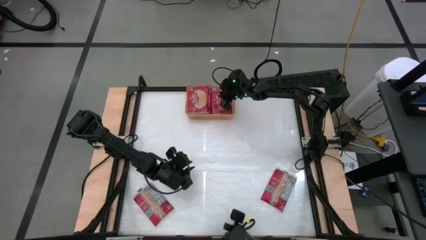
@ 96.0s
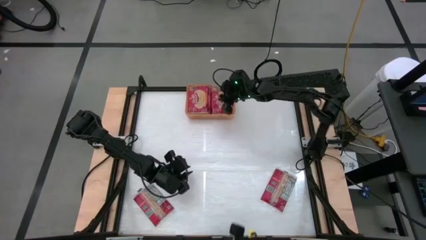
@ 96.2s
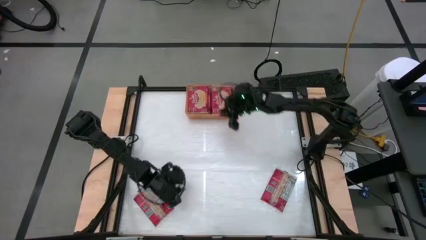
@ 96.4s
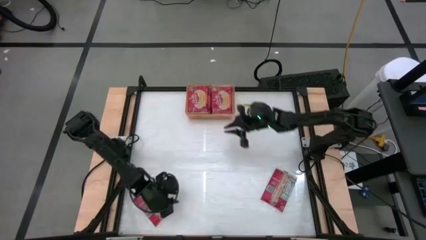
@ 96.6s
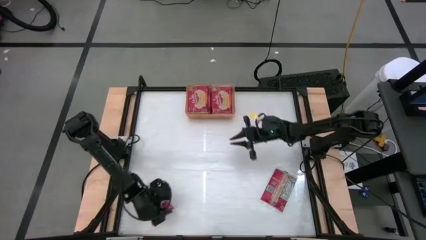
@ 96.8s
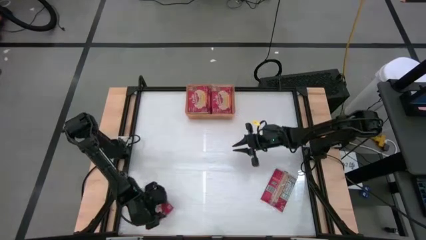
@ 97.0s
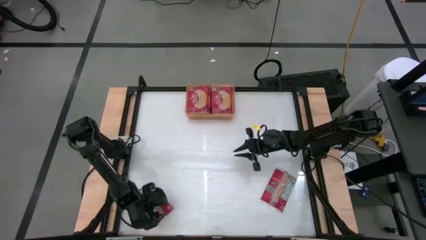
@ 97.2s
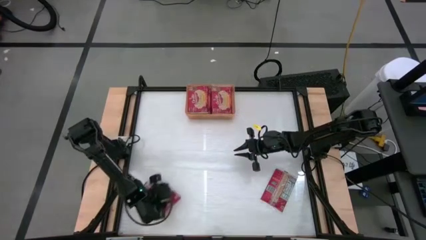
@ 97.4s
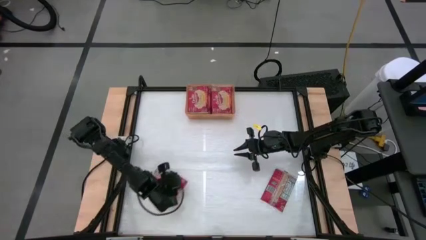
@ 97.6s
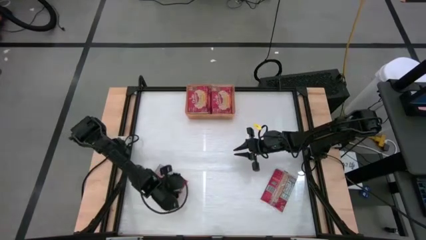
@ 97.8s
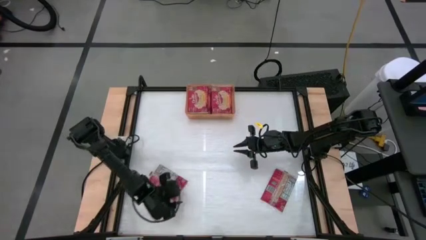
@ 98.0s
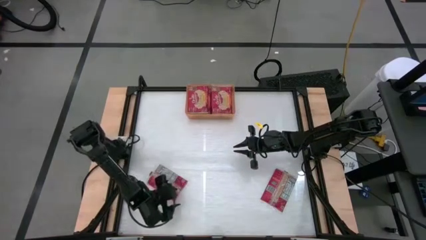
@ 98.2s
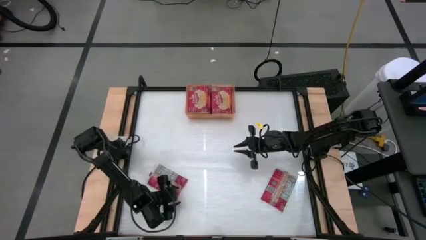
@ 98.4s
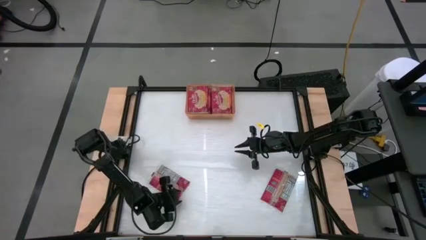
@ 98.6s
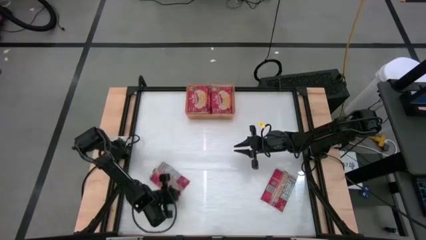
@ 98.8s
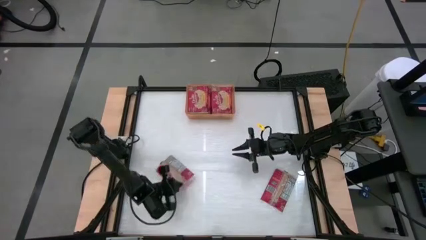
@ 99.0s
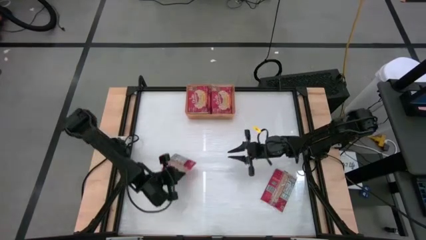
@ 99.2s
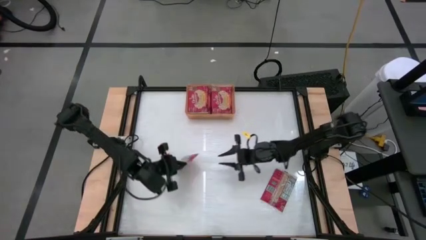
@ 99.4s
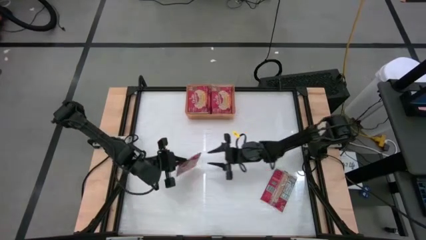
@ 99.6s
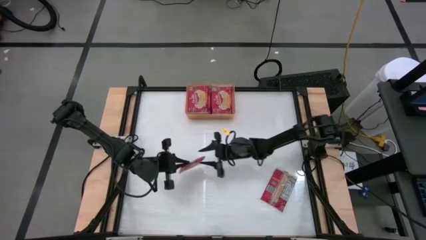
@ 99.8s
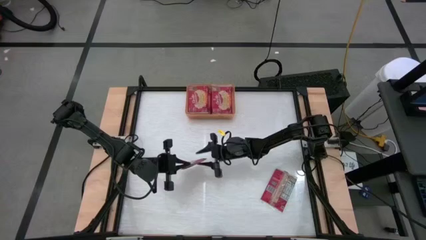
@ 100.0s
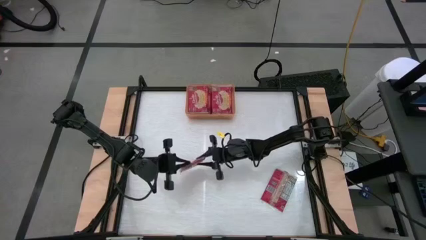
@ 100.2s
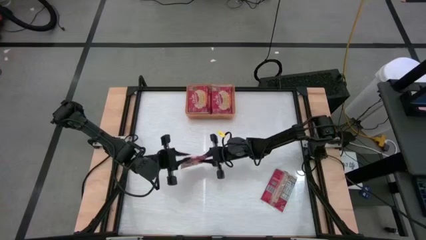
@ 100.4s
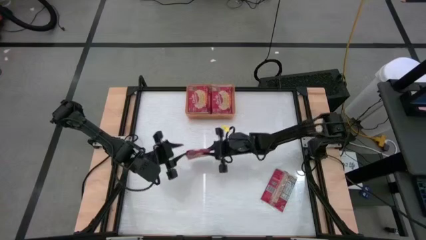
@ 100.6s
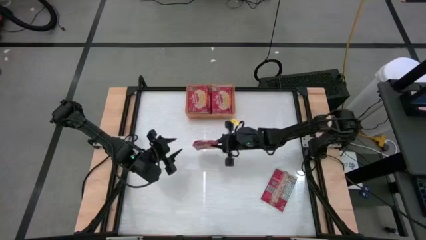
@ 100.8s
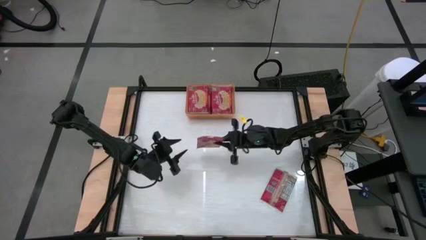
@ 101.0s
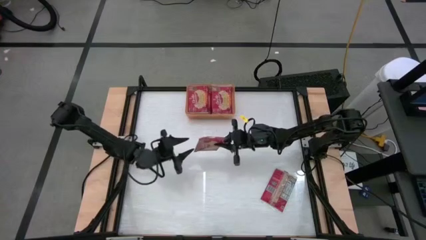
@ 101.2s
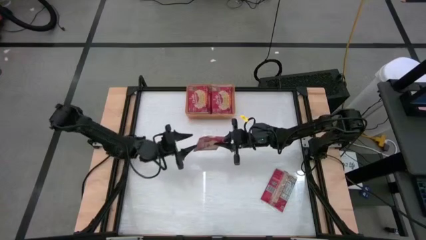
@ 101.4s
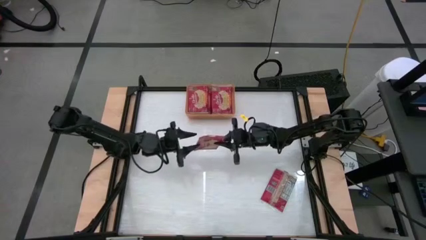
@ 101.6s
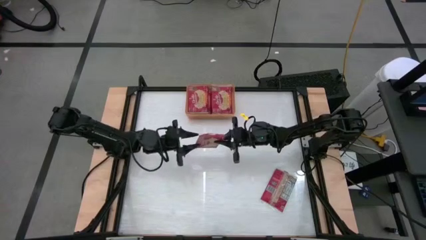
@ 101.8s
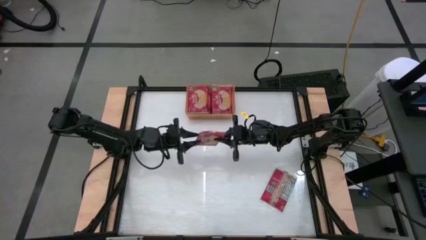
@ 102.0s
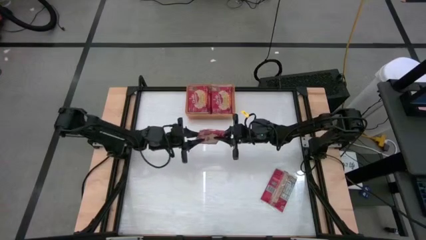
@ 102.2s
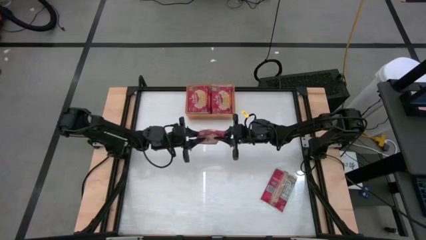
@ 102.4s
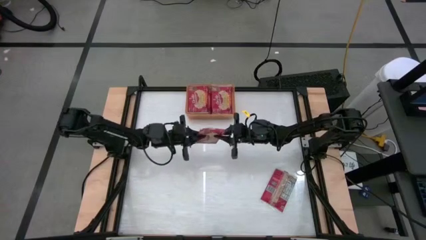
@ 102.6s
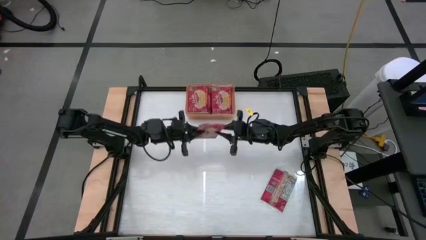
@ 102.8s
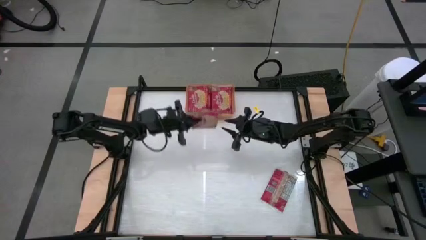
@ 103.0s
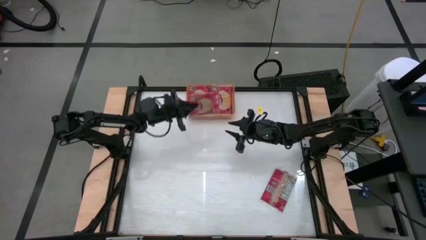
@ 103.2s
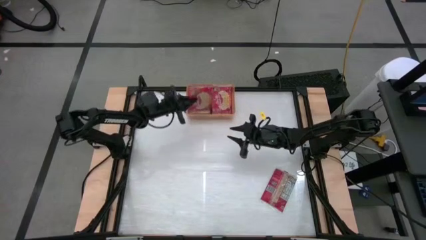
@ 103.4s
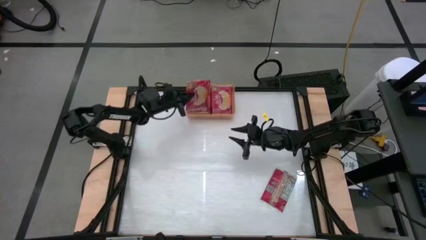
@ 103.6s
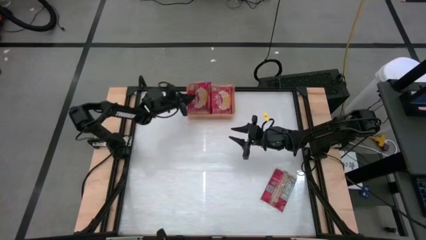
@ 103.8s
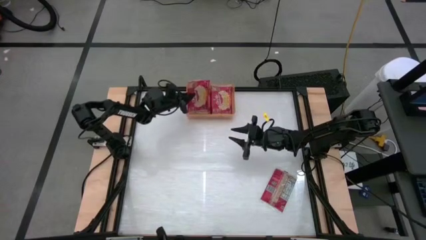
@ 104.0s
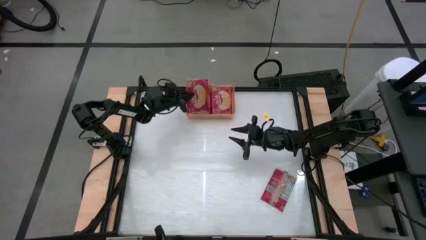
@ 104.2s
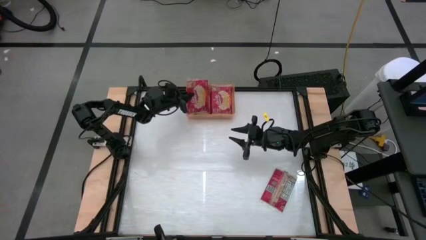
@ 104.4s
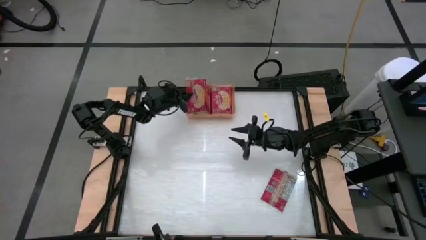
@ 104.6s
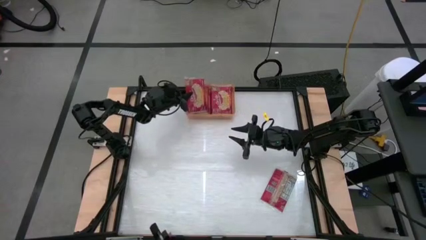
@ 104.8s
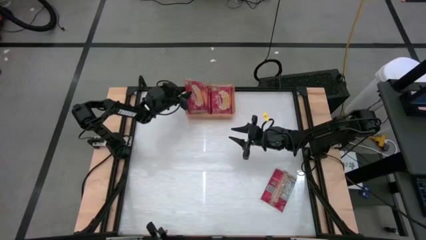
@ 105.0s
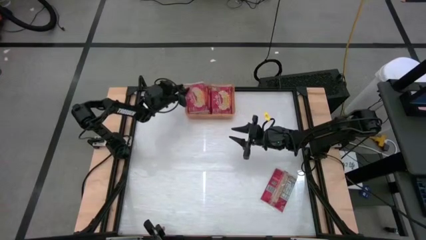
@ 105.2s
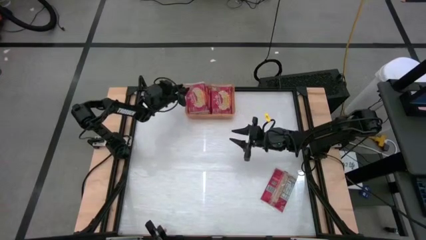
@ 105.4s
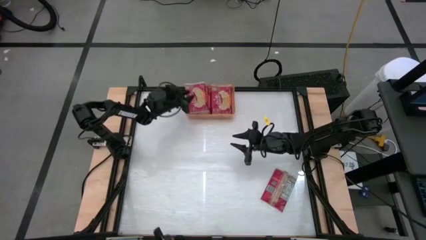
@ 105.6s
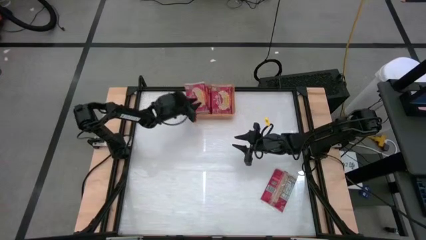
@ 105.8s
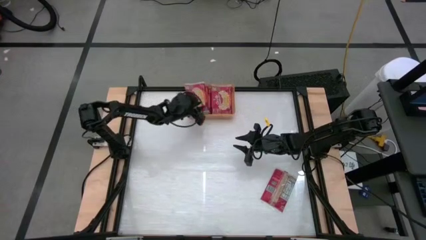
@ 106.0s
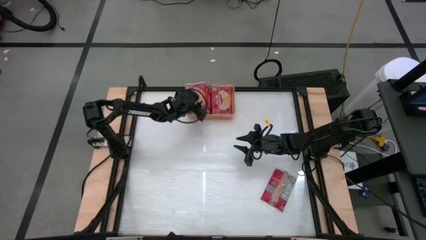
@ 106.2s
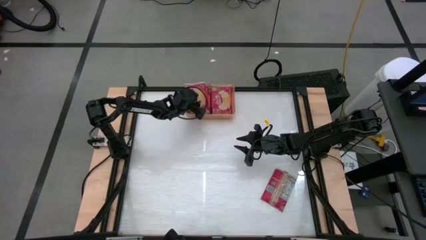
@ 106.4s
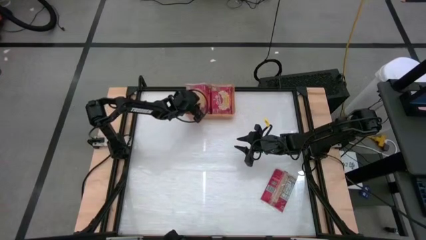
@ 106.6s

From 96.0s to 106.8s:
Task: Sort popcorn bags into baskets
Put the red popcorn bag into the orange bin

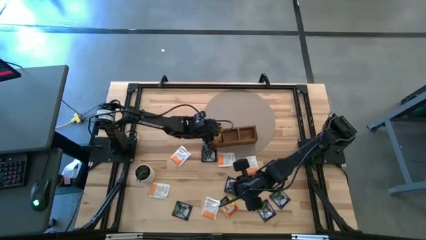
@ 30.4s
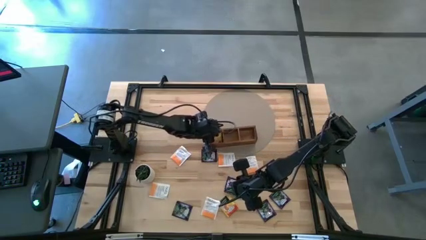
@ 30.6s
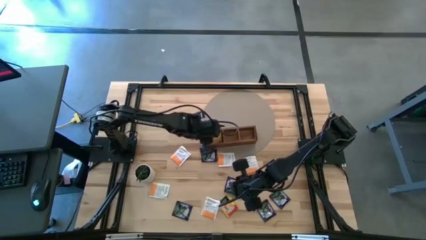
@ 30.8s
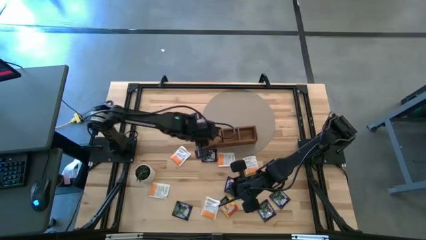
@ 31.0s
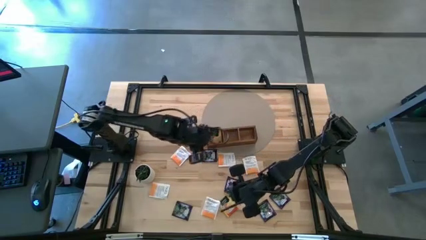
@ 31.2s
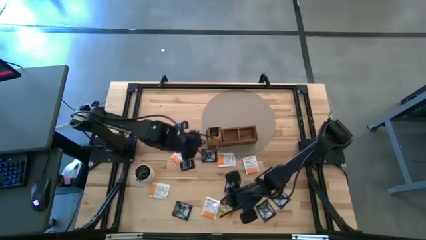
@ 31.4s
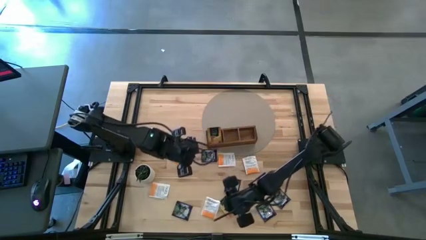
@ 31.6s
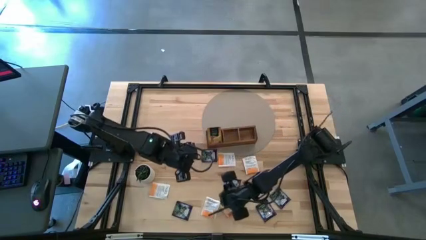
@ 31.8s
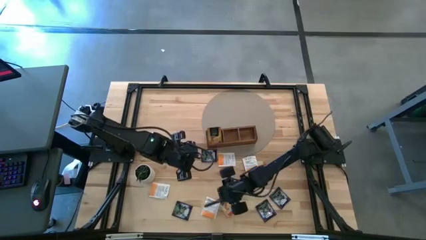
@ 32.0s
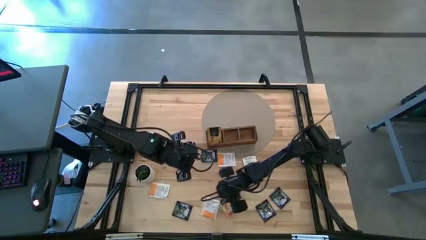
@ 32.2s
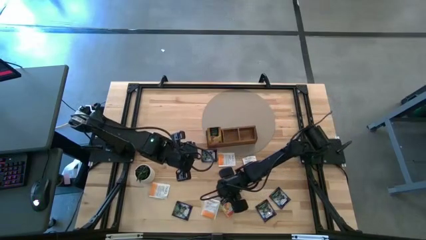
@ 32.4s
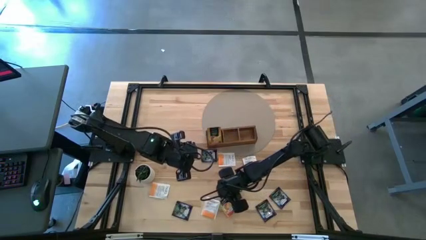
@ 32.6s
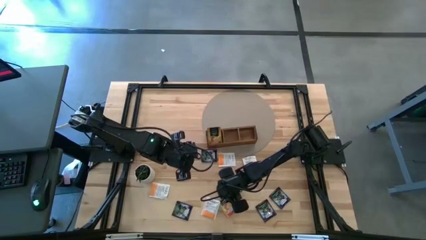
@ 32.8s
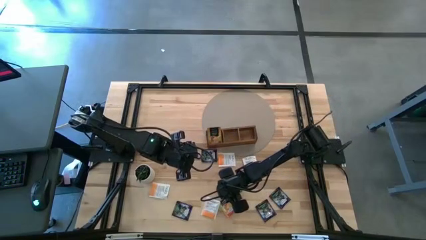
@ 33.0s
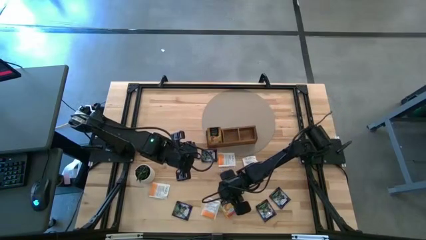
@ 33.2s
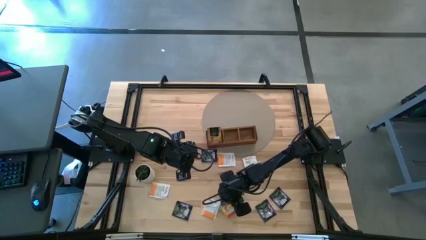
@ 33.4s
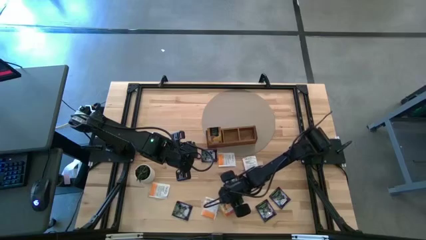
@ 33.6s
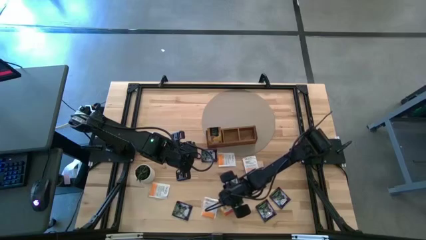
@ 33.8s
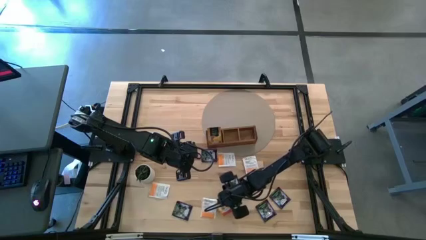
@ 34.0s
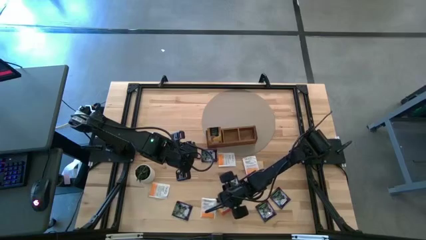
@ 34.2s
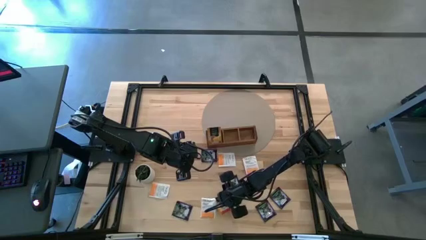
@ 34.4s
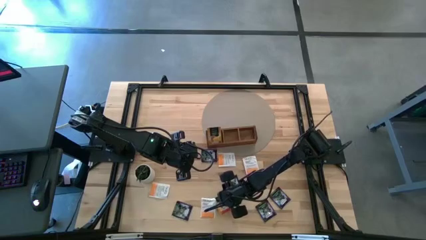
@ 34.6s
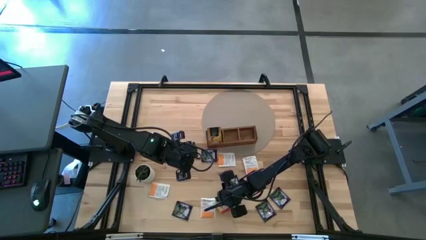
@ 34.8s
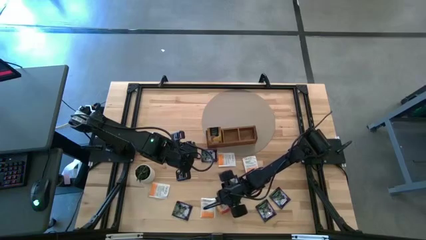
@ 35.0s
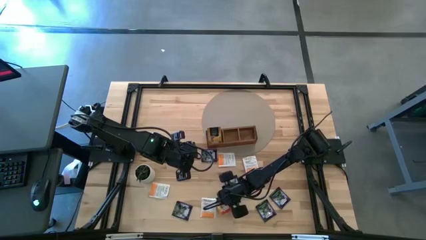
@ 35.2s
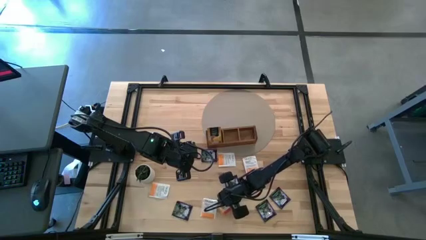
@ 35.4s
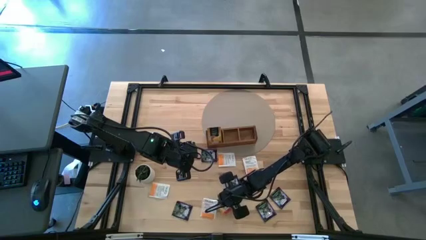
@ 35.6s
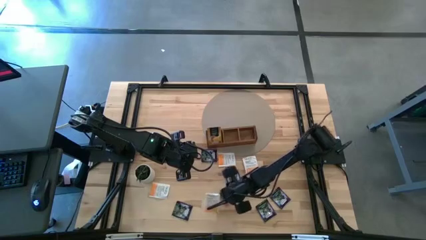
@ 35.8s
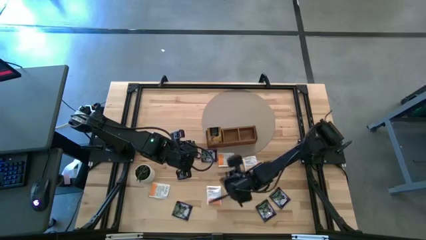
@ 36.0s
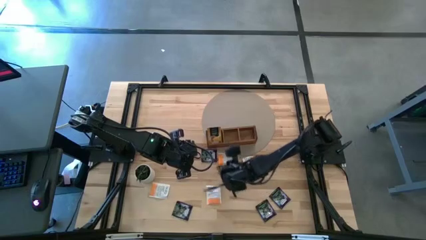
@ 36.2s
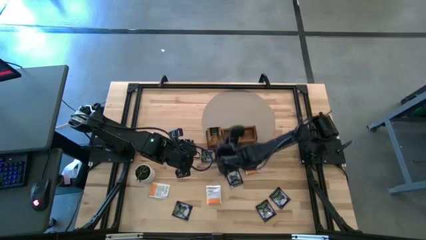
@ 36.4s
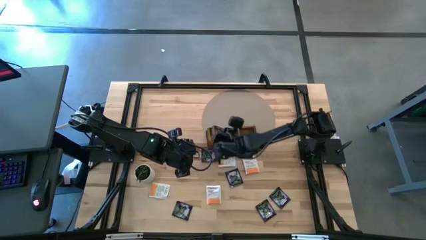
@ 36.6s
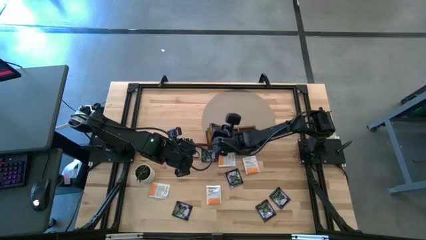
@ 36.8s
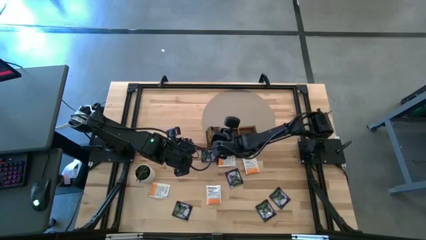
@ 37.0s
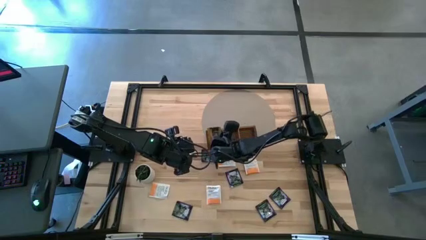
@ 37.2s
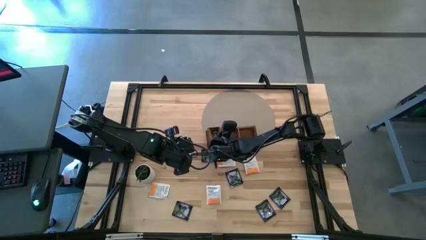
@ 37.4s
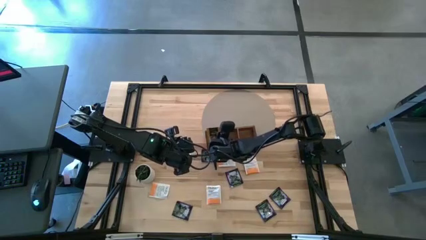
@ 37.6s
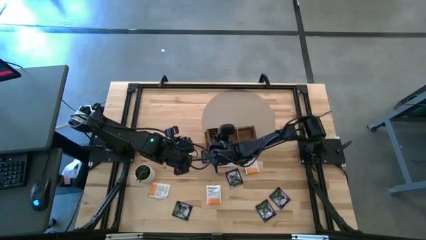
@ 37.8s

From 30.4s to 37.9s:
Task: Pick & Place Tea
Put the yellow tea bag into the left section of the wooden organizer
